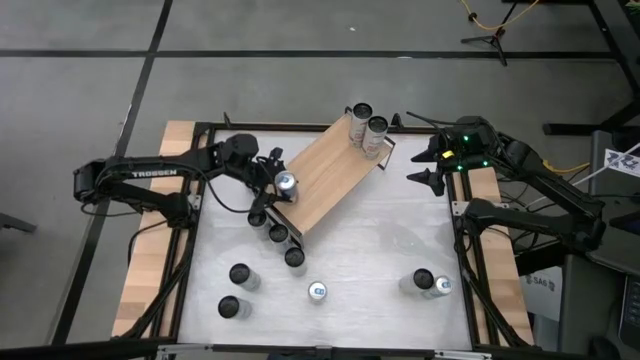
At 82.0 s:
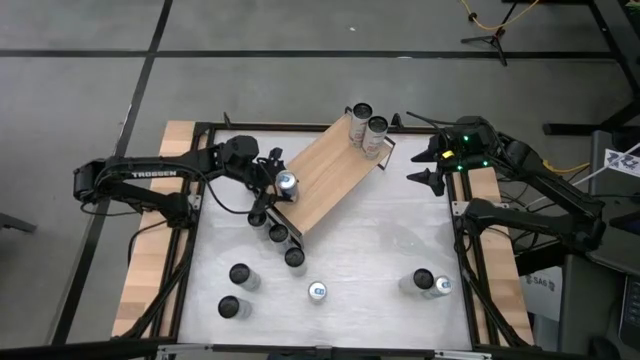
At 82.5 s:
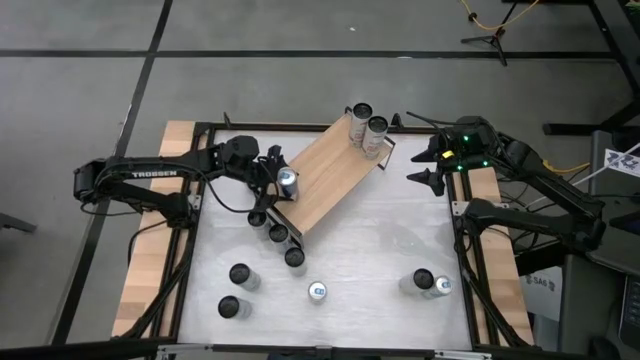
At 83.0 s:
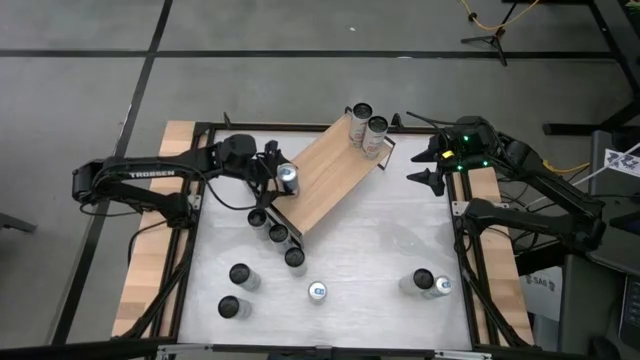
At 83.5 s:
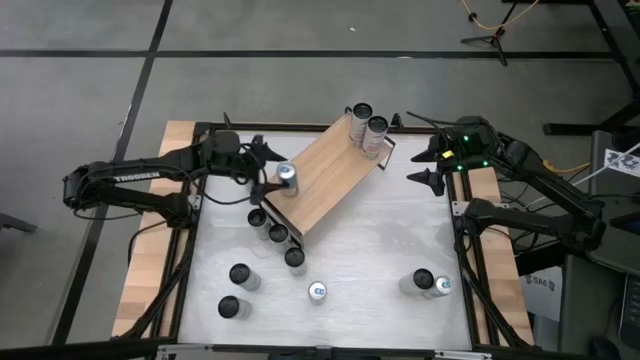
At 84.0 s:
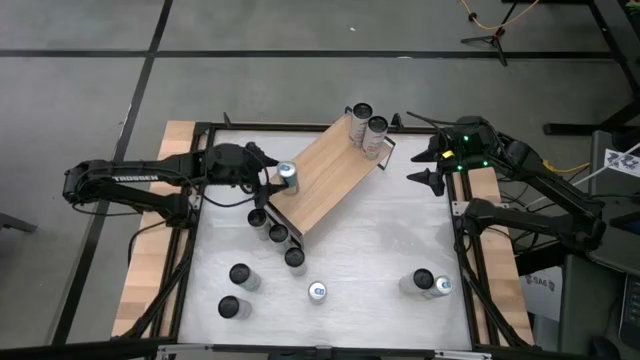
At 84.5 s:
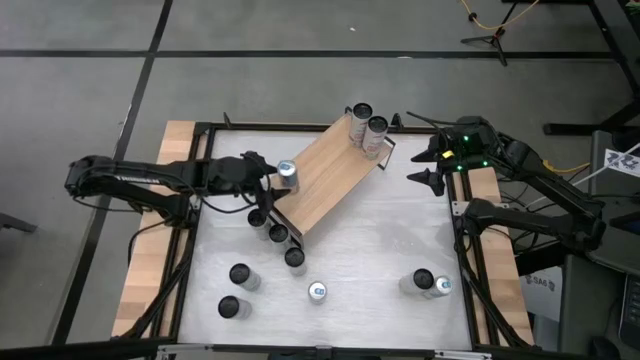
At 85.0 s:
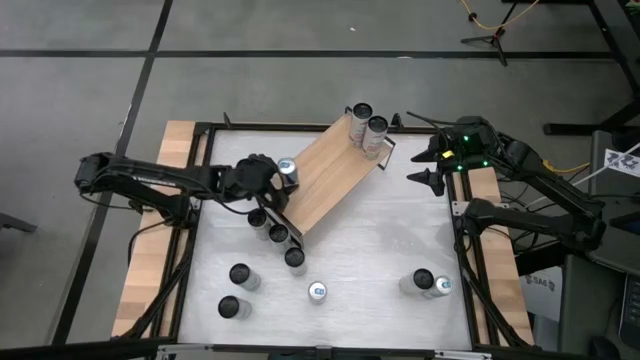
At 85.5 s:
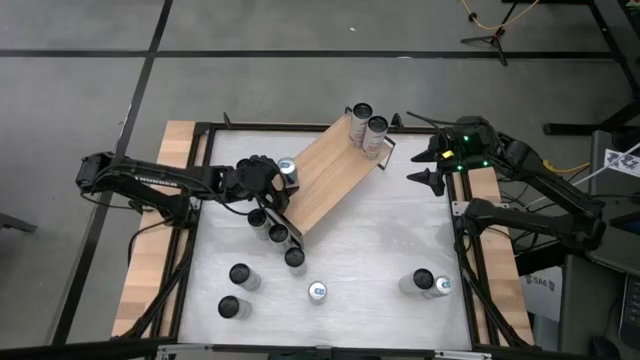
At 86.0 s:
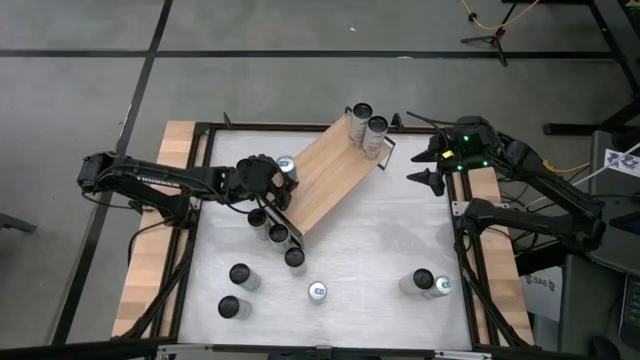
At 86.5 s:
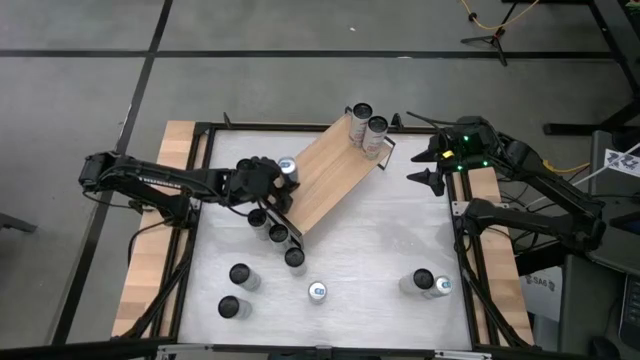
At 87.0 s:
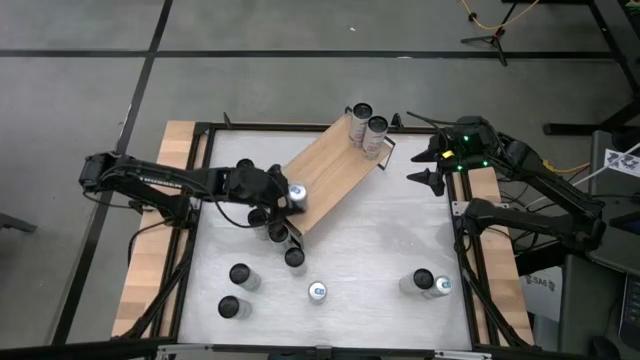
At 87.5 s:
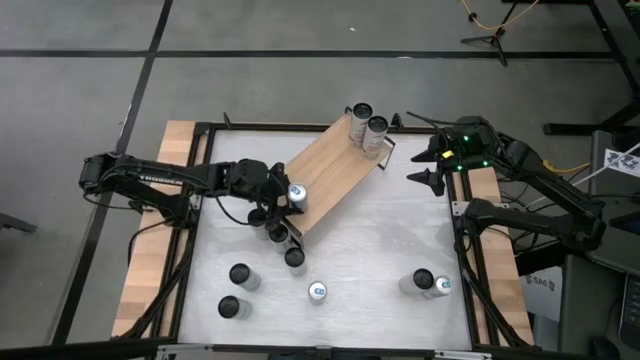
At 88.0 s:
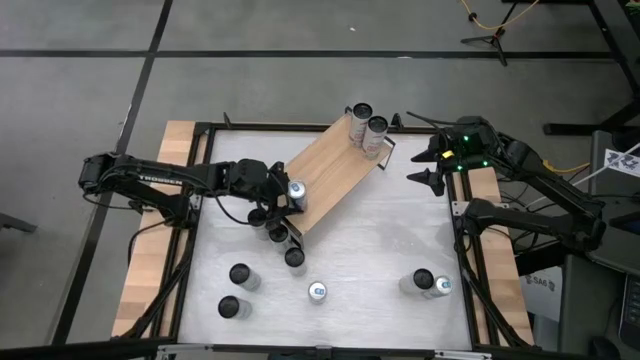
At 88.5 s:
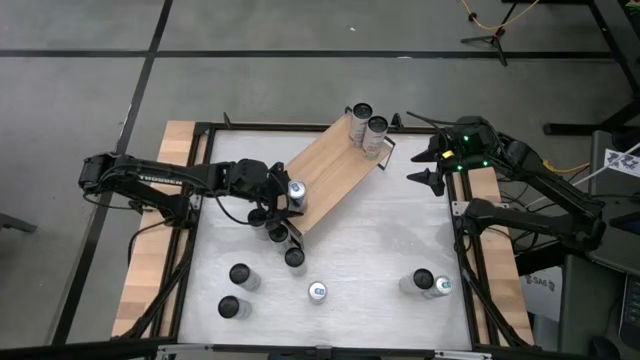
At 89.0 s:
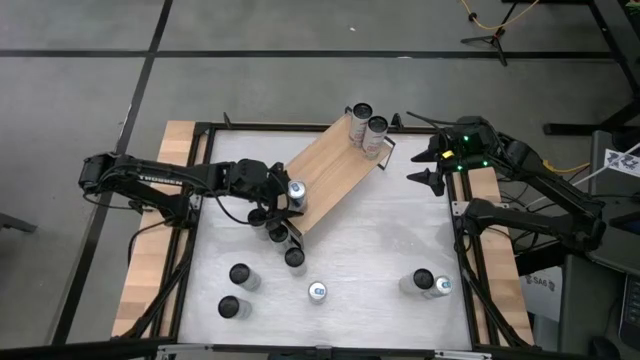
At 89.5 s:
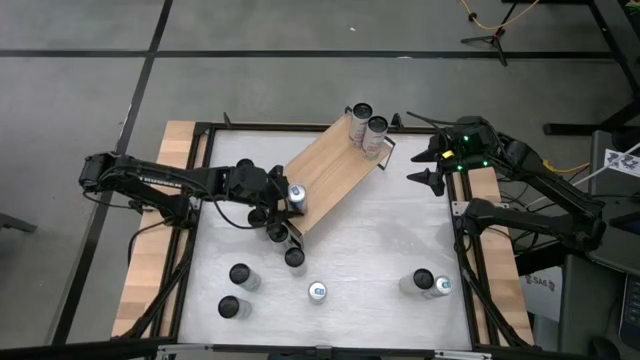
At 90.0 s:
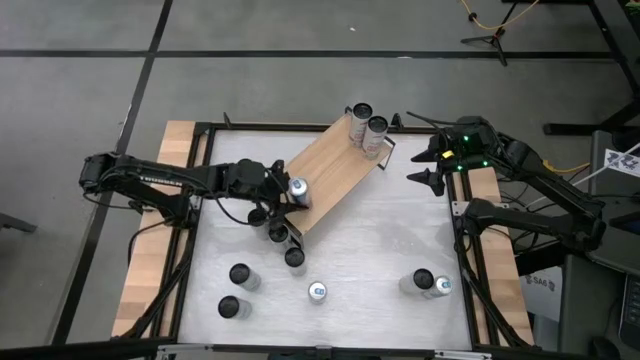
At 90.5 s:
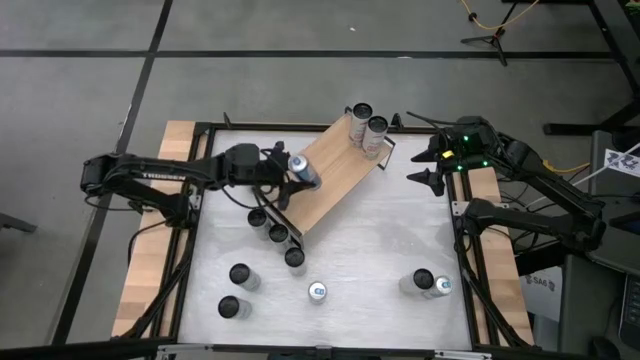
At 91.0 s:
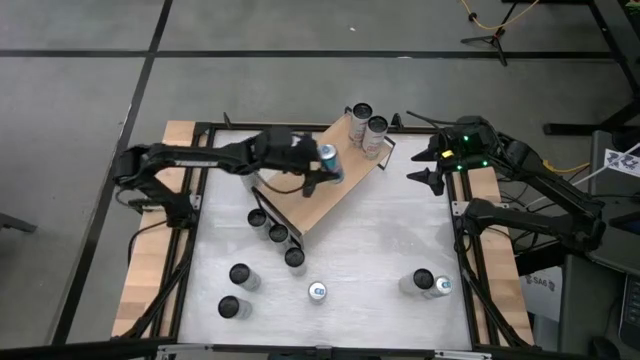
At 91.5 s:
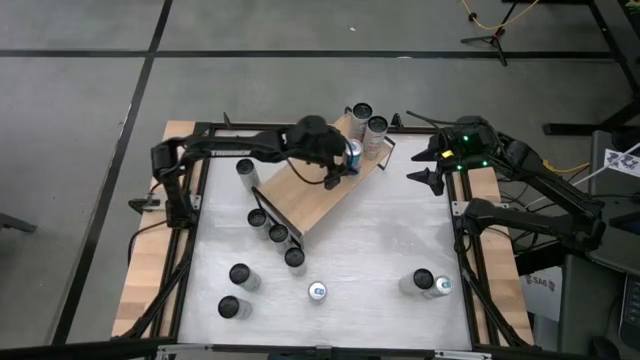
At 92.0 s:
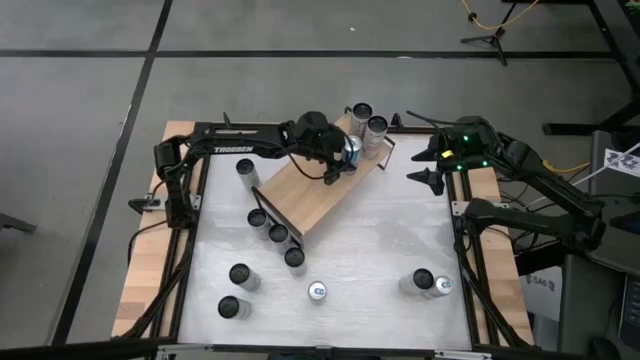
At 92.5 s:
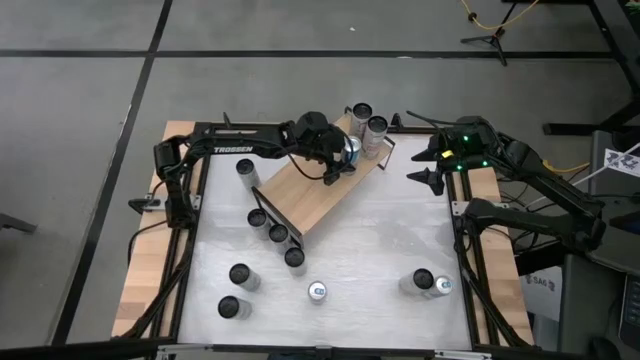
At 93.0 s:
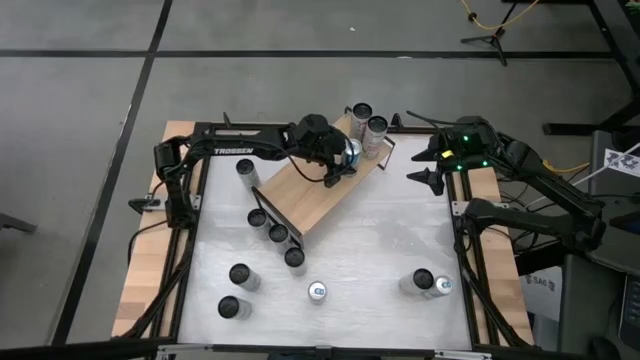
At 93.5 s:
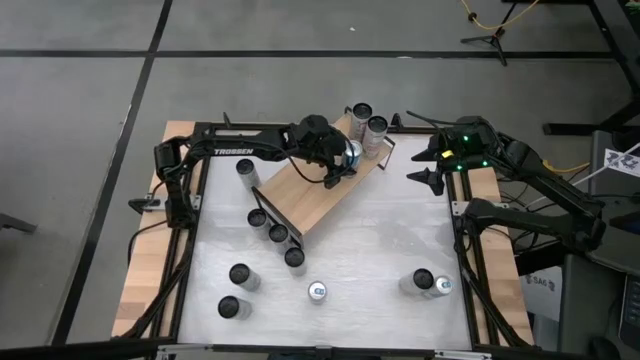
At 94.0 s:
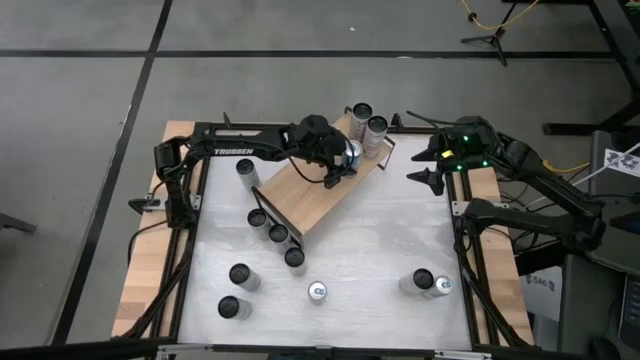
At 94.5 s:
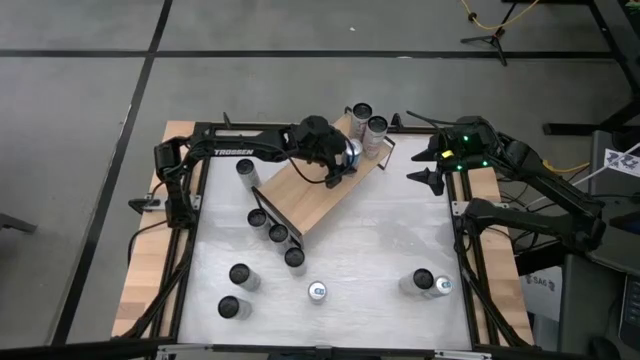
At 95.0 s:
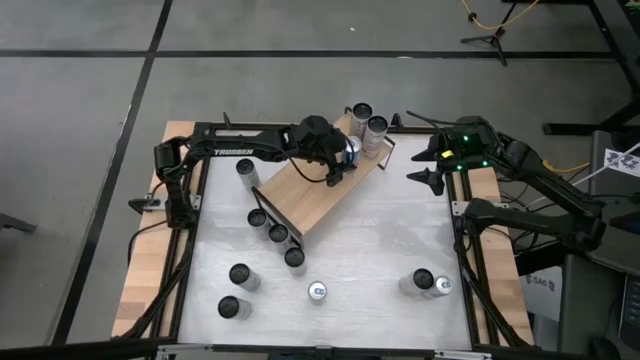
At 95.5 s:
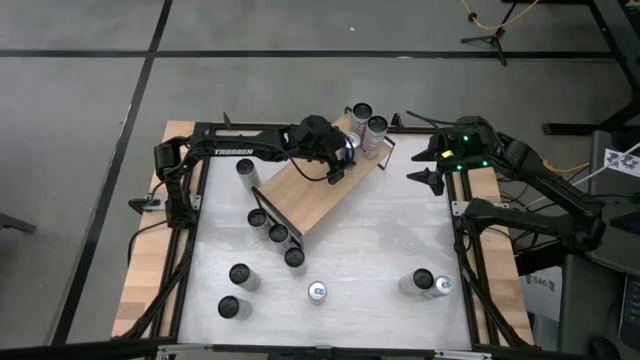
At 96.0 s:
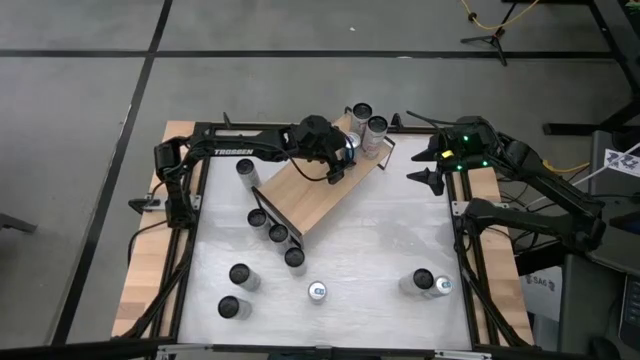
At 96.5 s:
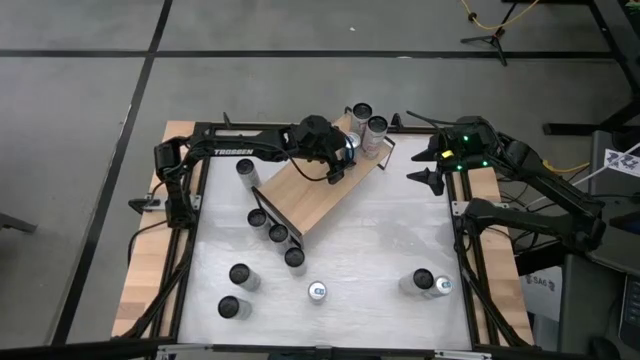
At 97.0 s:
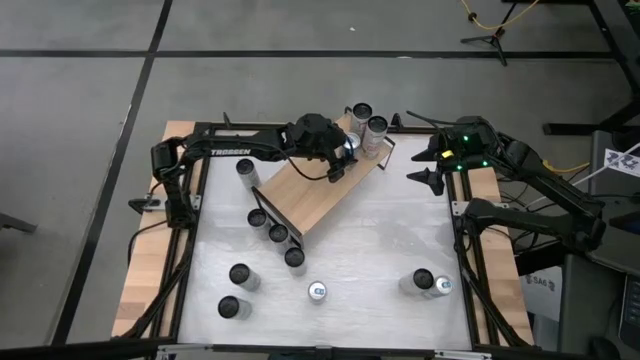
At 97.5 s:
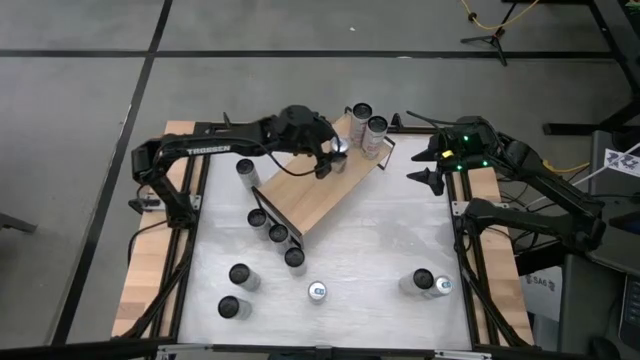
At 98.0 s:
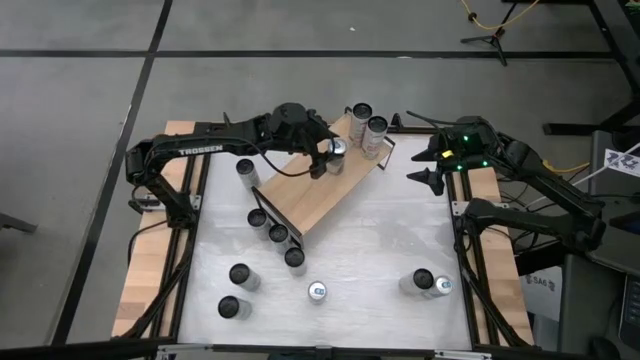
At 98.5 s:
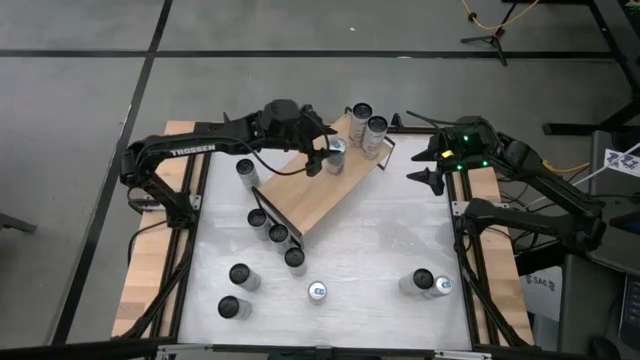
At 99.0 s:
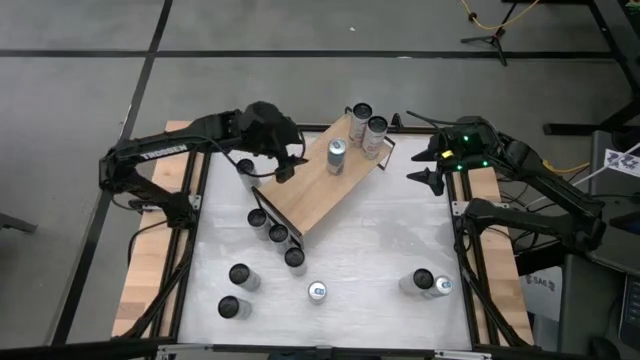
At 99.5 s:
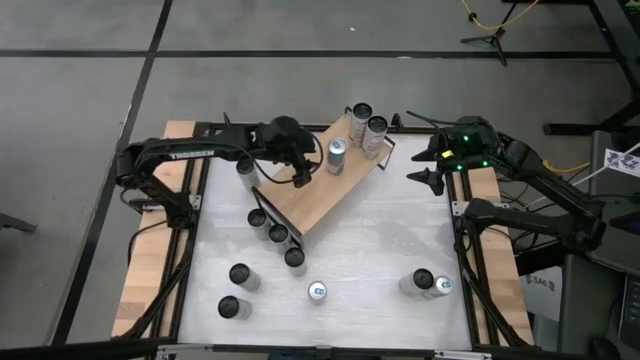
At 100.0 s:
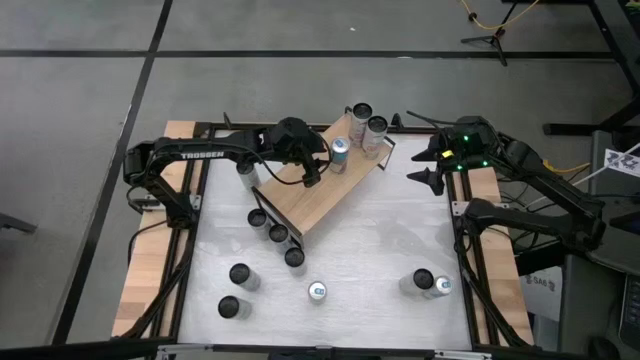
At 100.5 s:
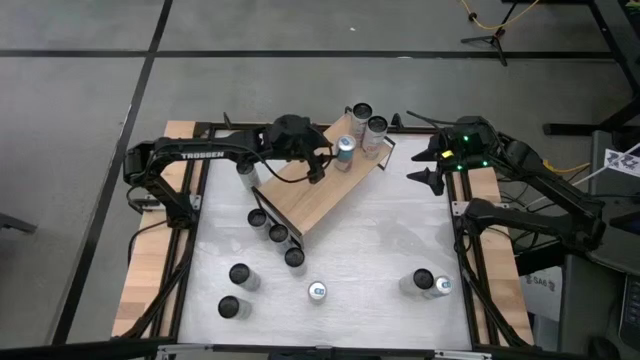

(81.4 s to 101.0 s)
Task: Place canned beverage on shelf
Put the blue soda can on the shelf
